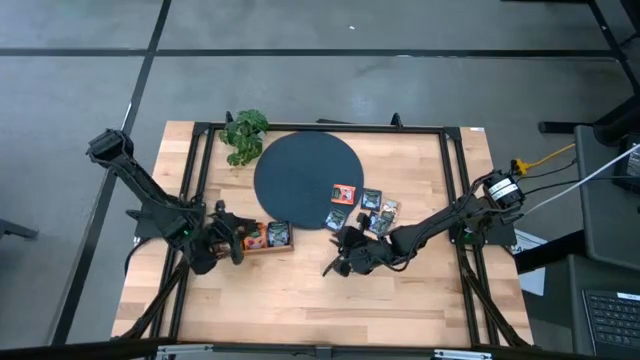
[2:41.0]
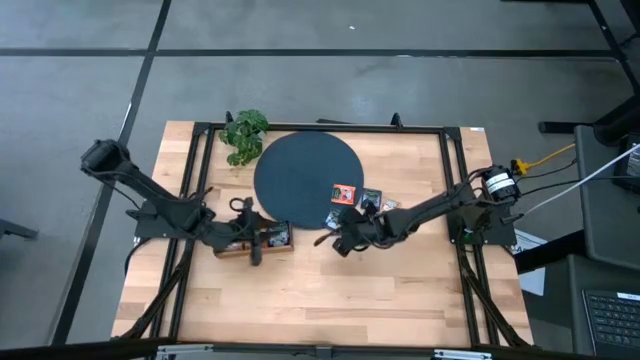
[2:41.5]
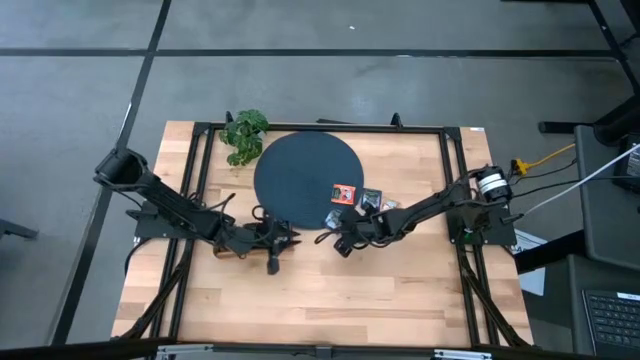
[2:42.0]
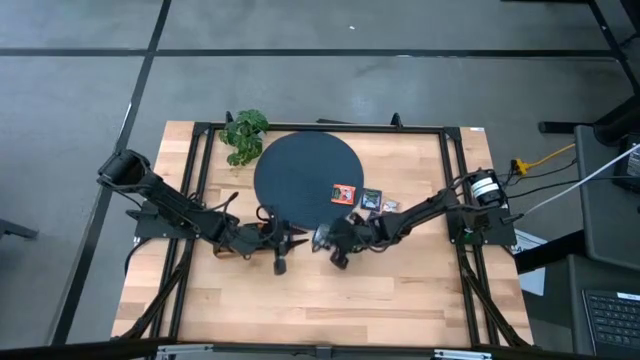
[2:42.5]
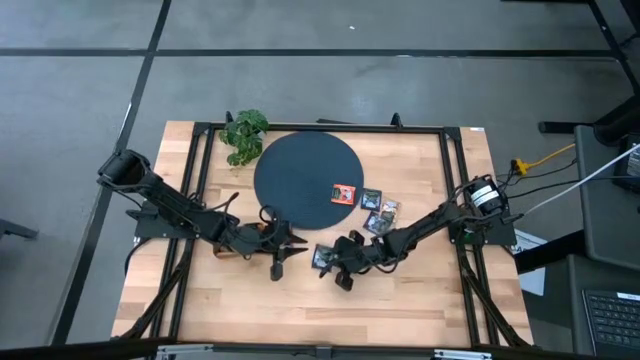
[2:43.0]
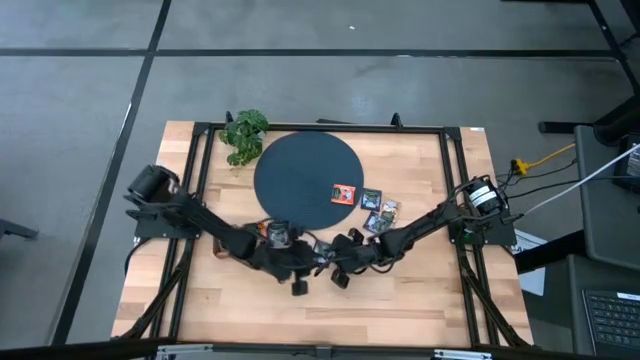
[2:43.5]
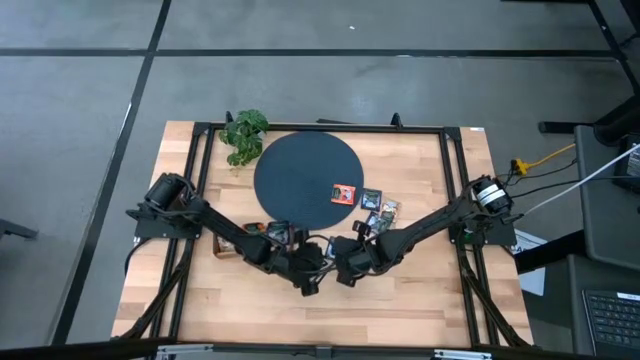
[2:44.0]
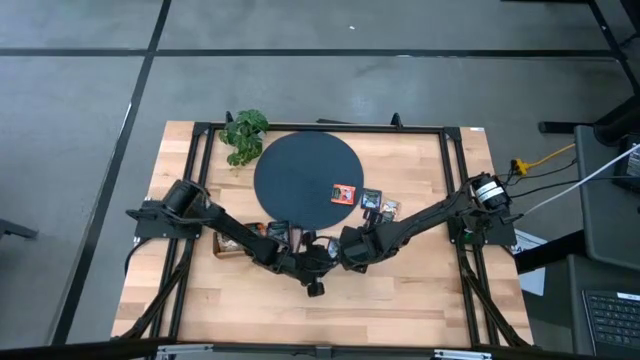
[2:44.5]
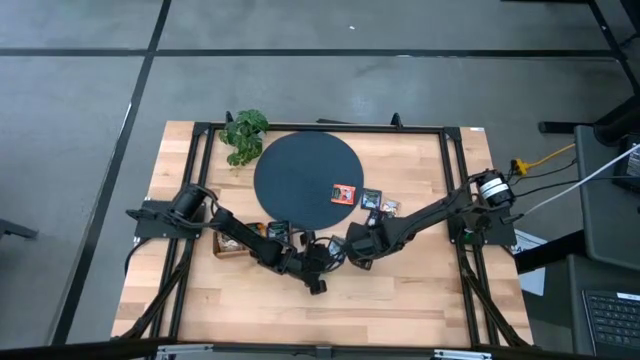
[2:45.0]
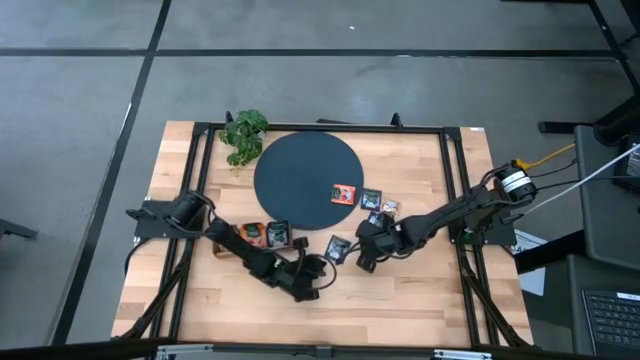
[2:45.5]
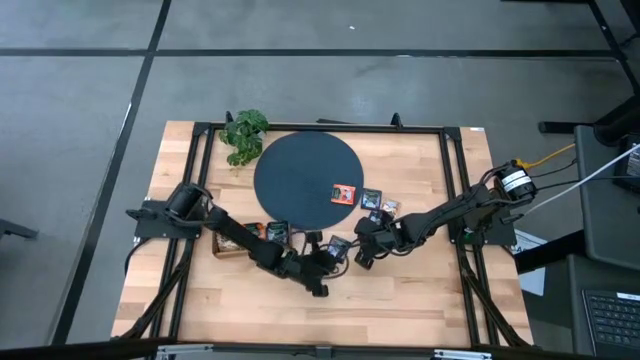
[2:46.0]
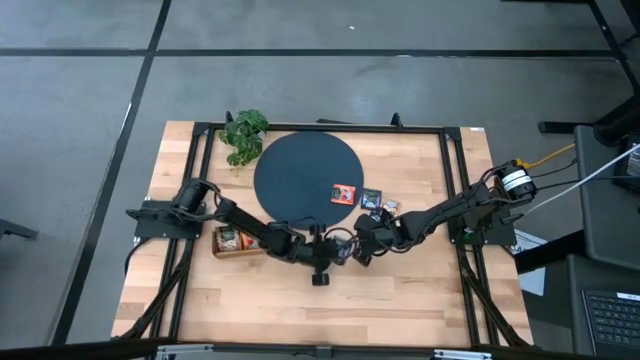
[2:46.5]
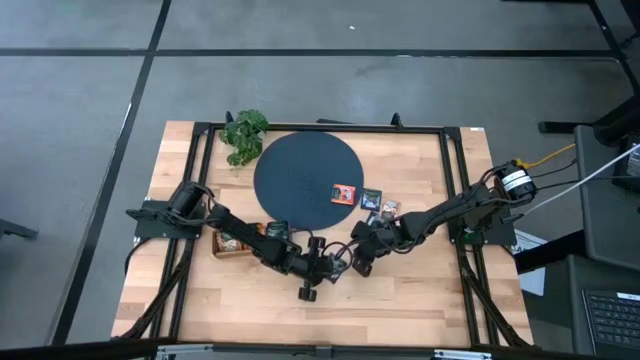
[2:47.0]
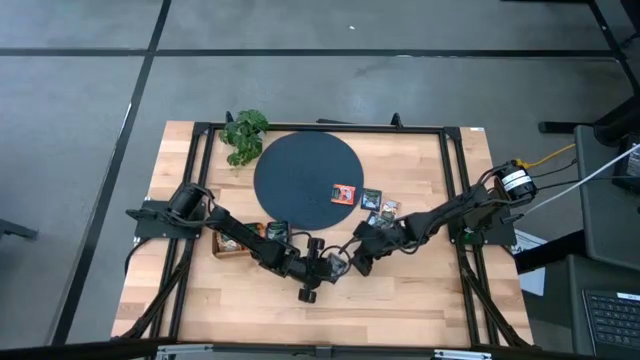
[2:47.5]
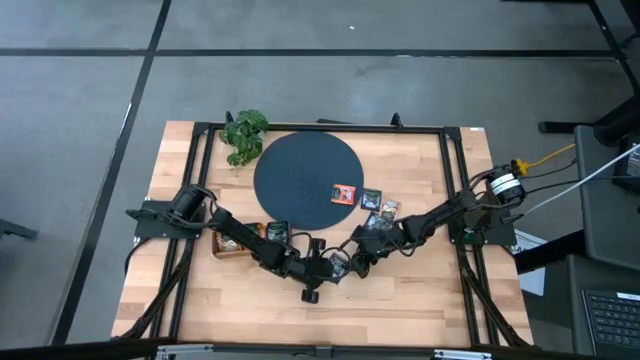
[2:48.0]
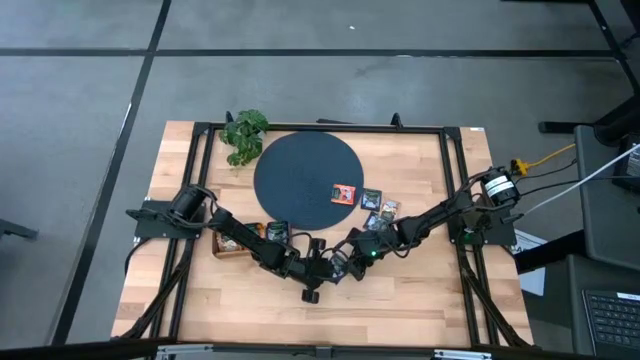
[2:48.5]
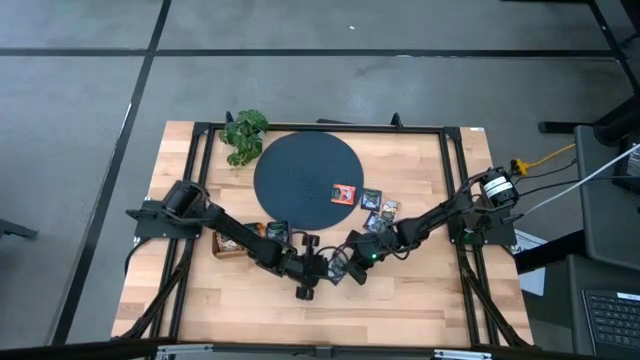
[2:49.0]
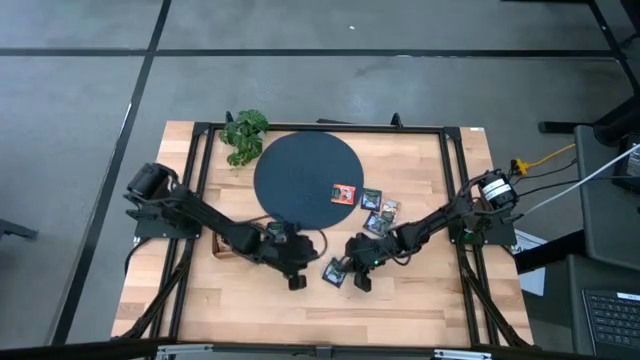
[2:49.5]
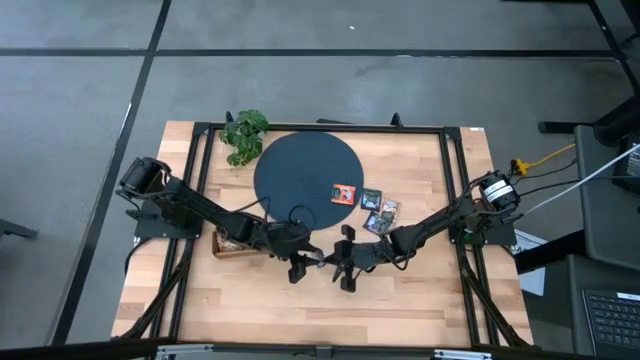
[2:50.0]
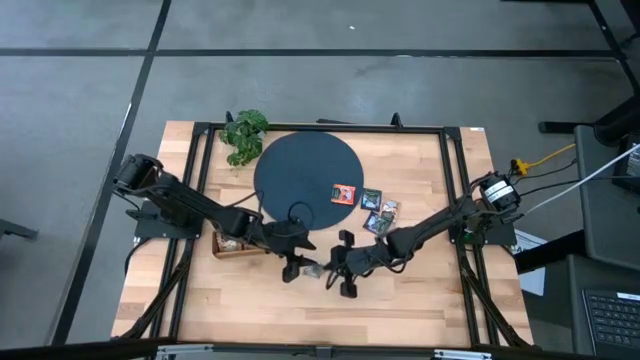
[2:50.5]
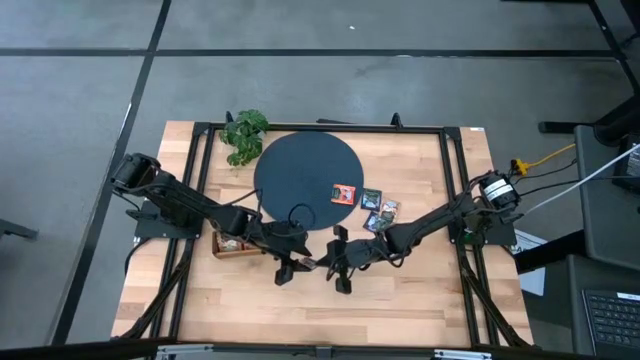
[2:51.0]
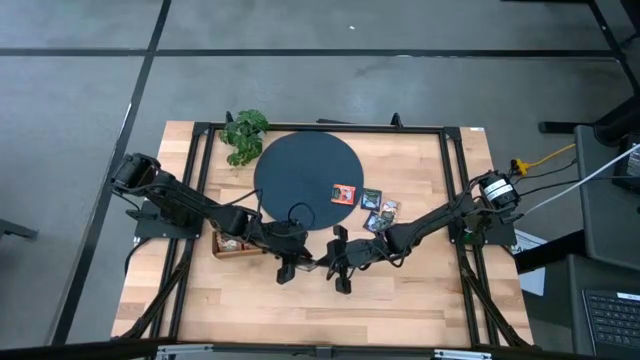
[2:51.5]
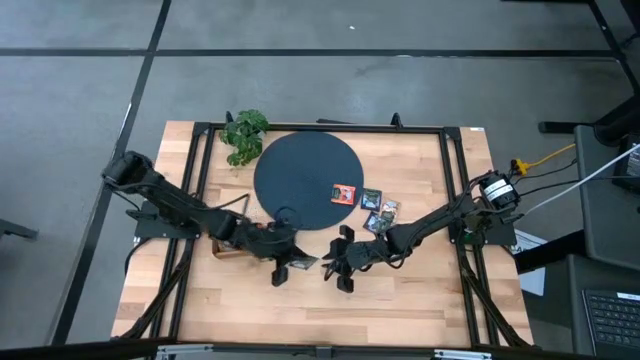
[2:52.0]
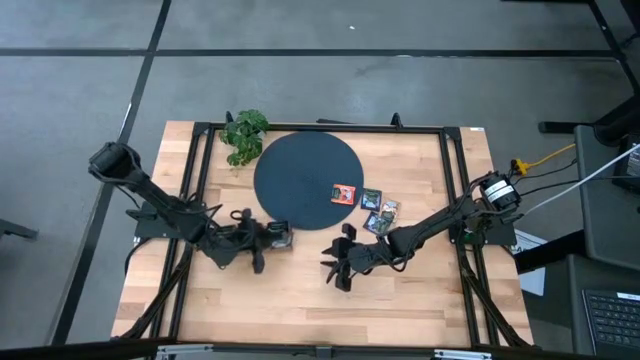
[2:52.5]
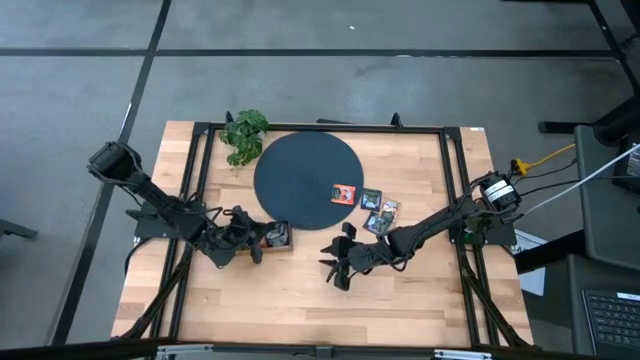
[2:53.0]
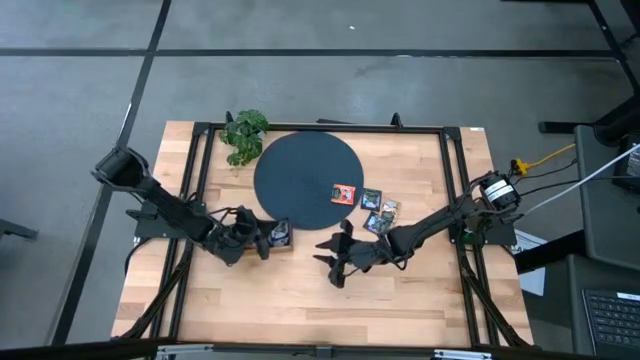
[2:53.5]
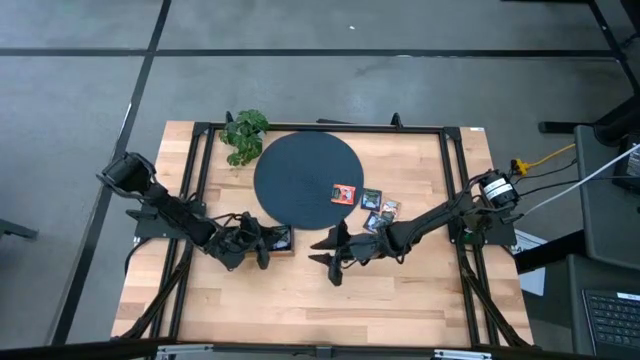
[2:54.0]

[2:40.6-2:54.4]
Task: Pick & Place Tea
Put the purple tea bag into the right section of the wooden organizer

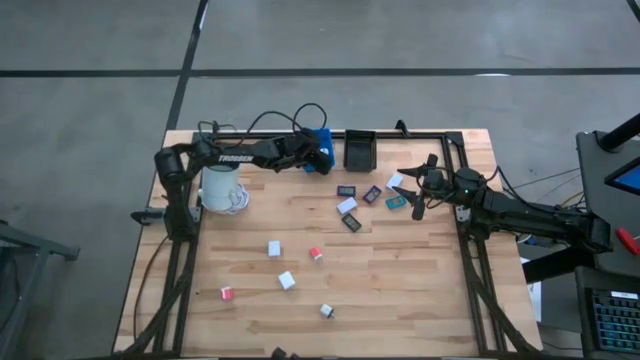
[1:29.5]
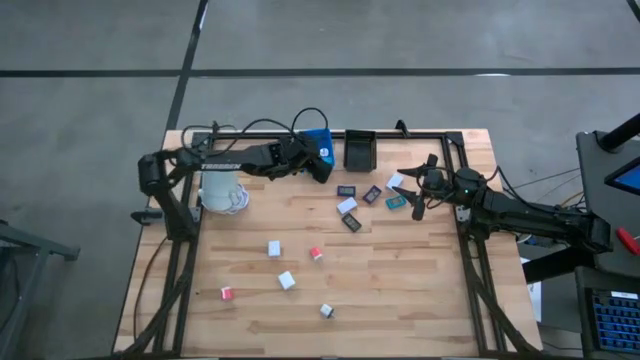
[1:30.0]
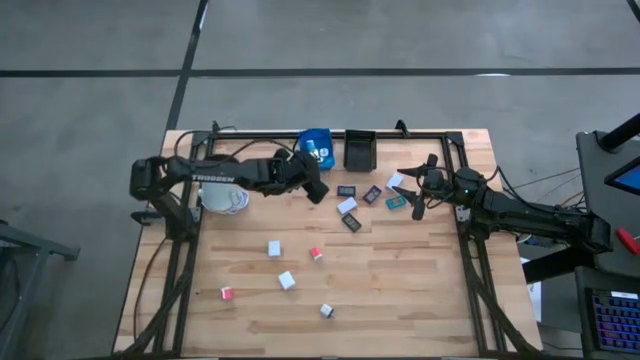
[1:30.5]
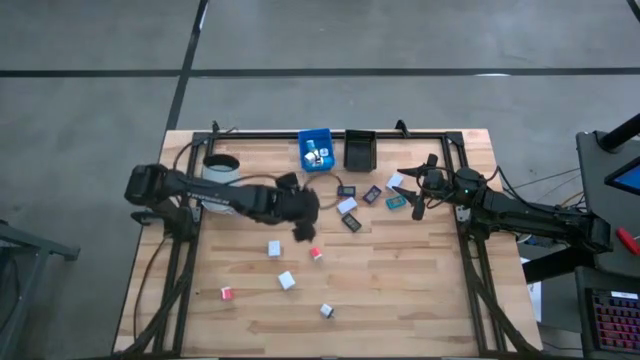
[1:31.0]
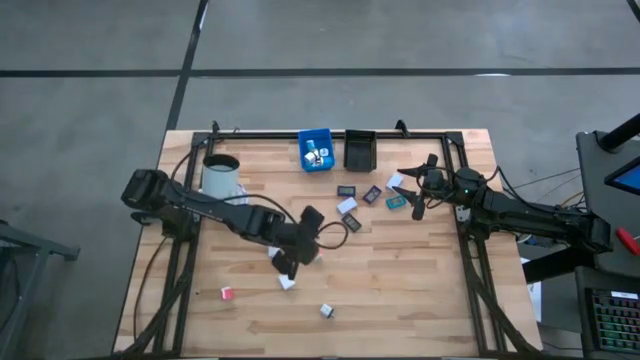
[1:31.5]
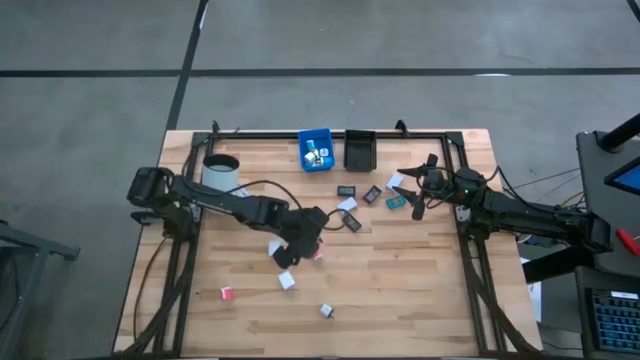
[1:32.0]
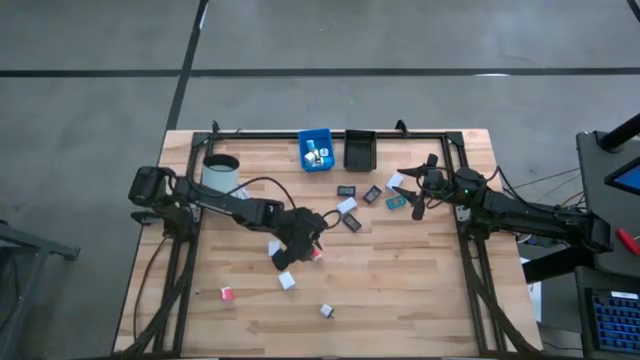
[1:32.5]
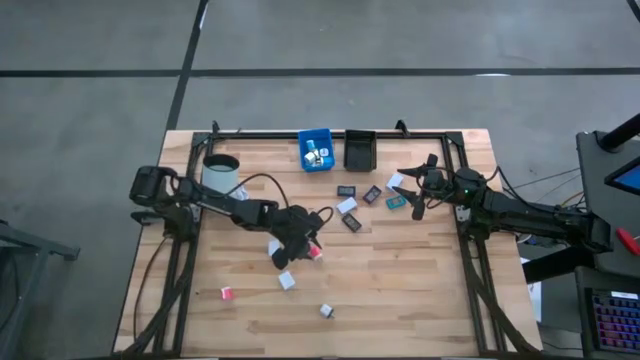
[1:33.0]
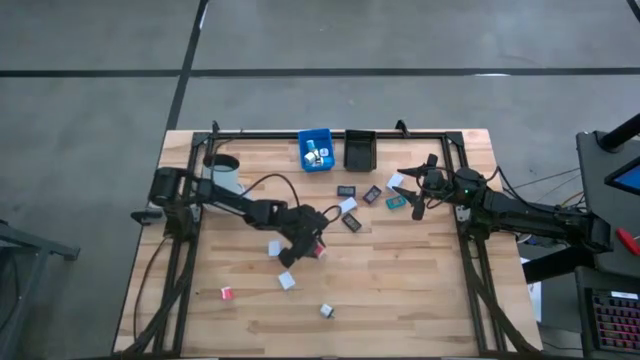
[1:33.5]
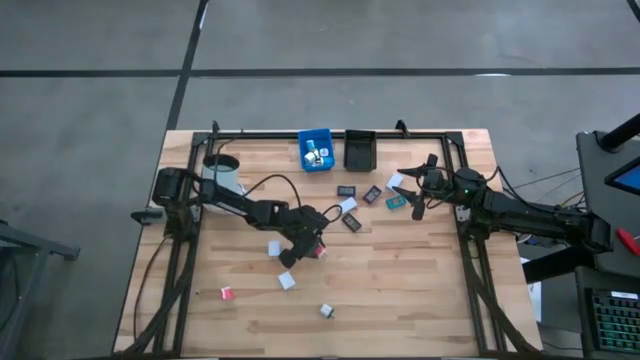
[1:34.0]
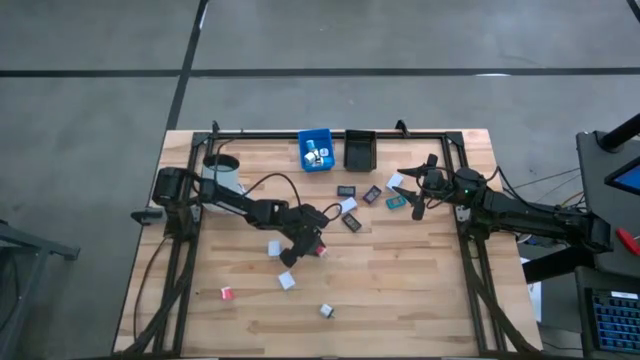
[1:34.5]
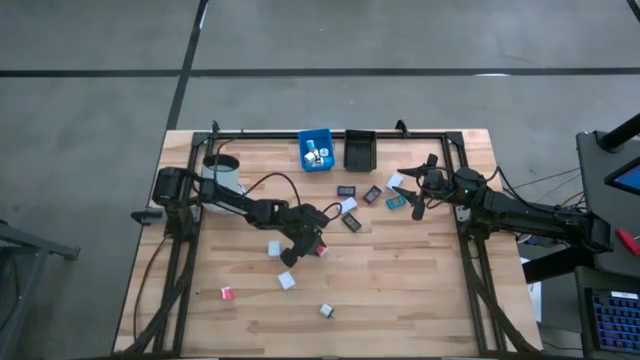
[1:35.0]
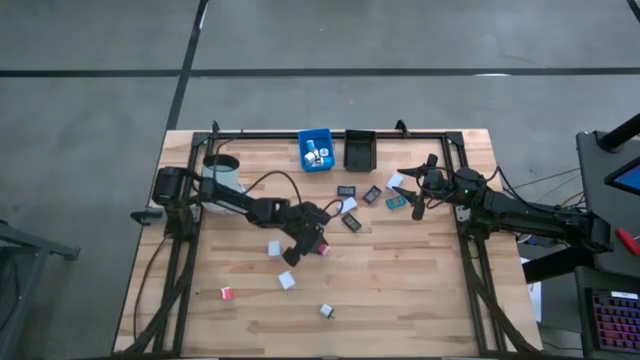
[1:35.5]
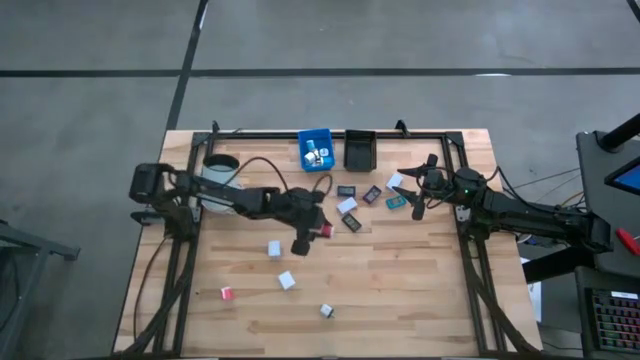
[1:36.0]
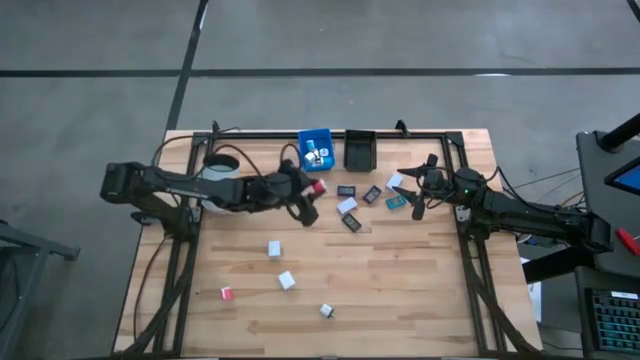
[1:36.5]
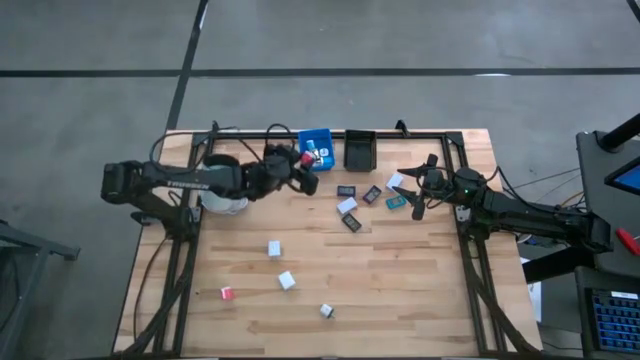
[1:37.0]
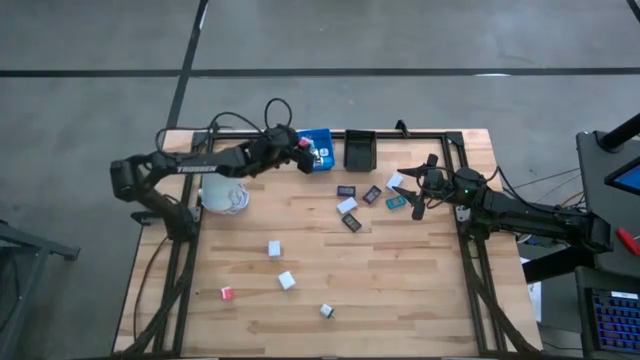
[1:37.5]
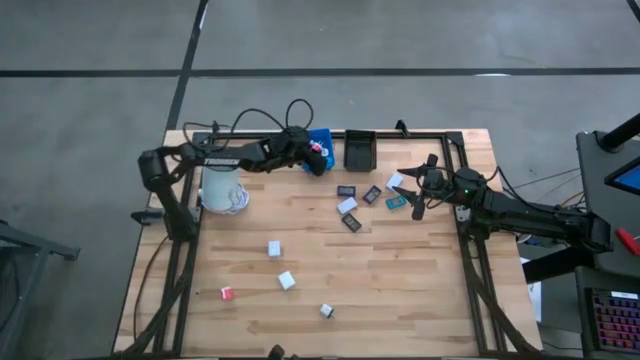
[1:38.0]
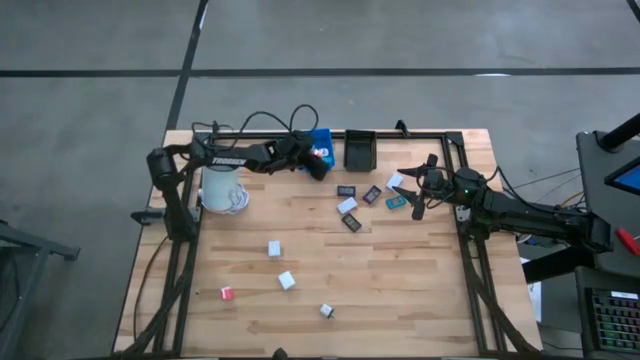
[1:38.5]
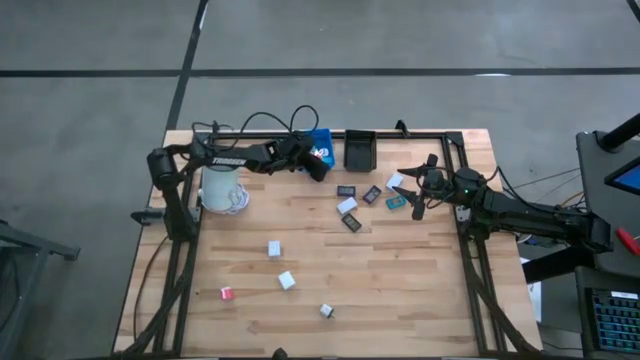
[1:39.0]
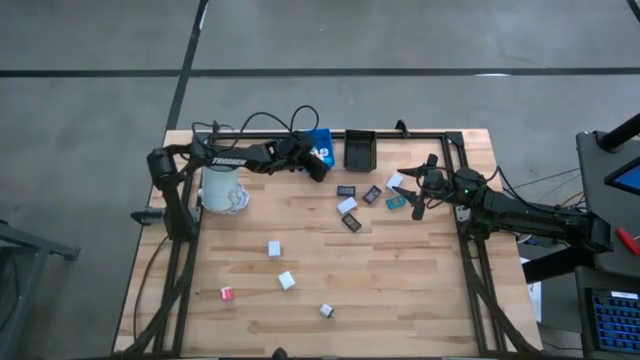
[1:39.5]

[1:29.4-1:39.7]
Task: Pick & Place Office items
Put the right small red adapter into the blue basket
